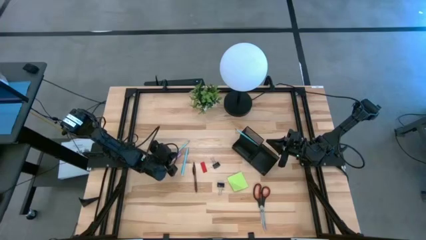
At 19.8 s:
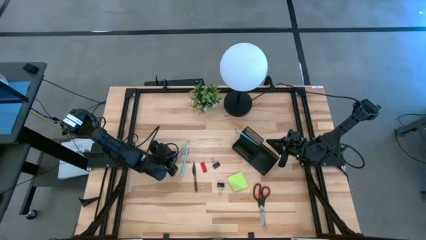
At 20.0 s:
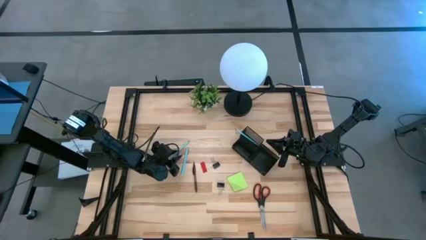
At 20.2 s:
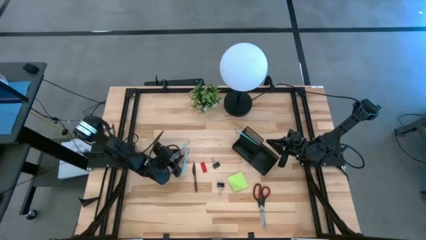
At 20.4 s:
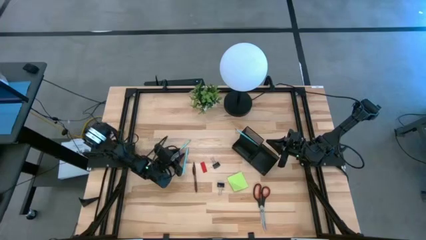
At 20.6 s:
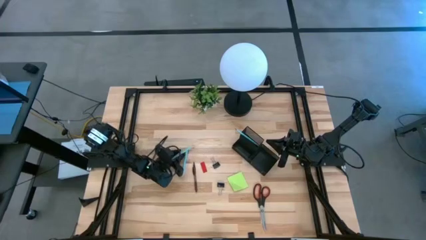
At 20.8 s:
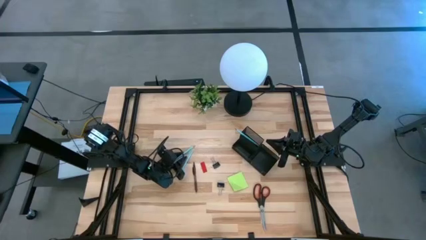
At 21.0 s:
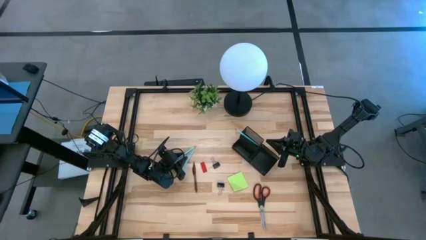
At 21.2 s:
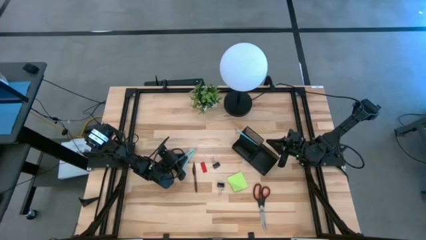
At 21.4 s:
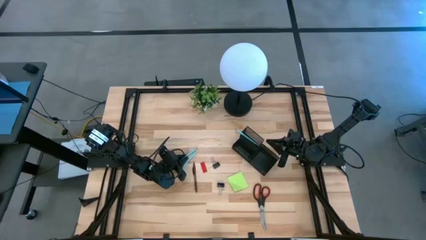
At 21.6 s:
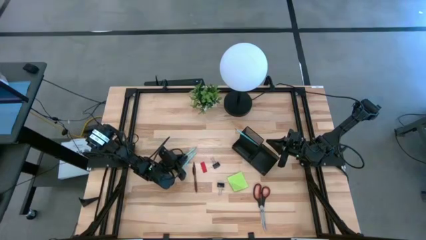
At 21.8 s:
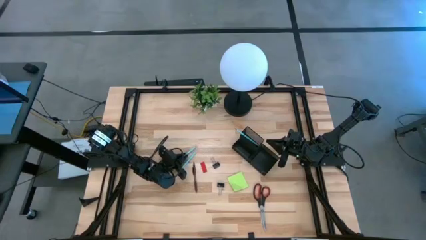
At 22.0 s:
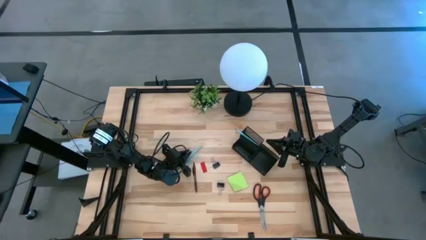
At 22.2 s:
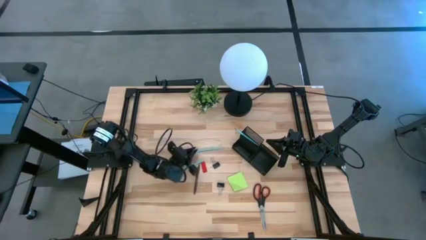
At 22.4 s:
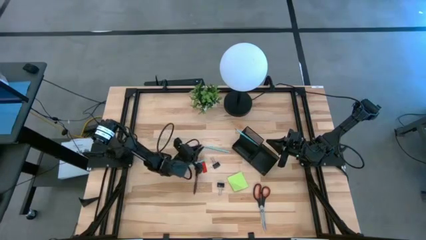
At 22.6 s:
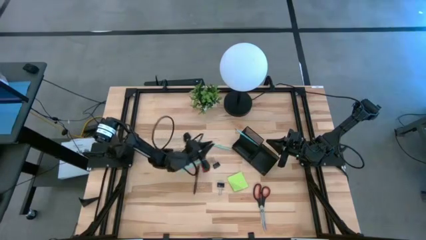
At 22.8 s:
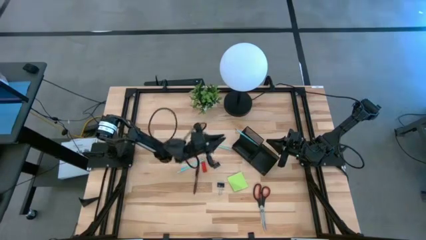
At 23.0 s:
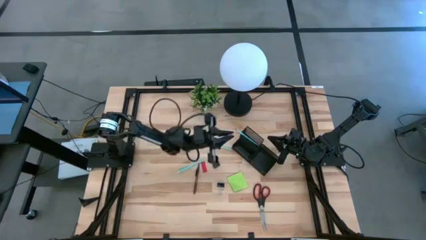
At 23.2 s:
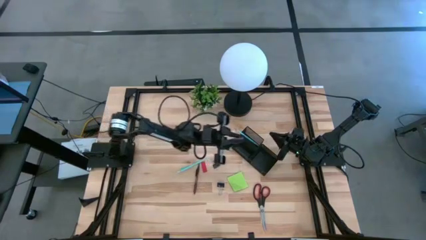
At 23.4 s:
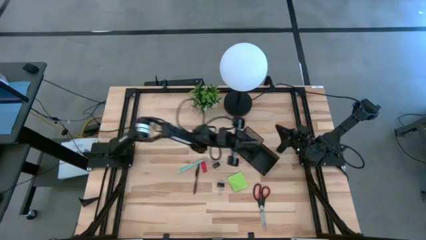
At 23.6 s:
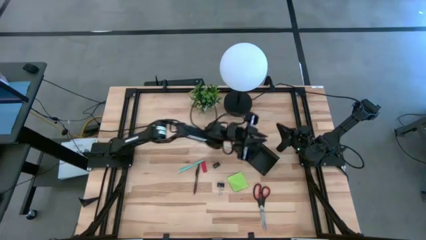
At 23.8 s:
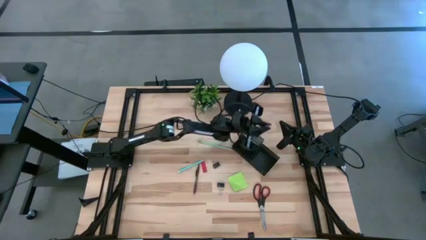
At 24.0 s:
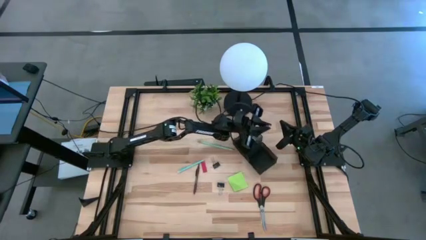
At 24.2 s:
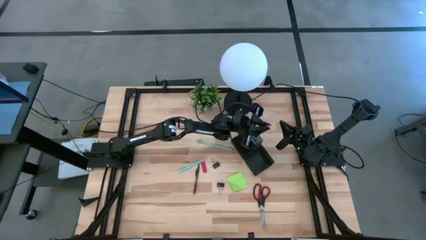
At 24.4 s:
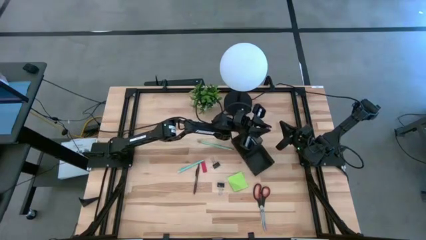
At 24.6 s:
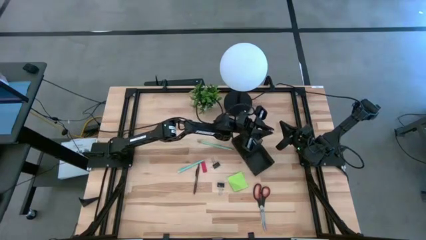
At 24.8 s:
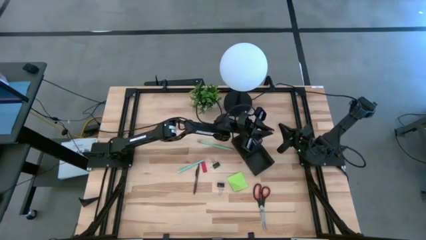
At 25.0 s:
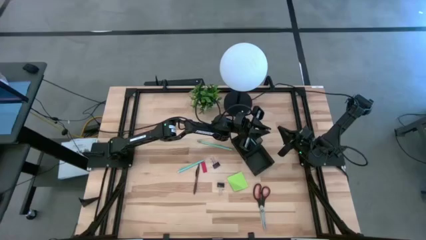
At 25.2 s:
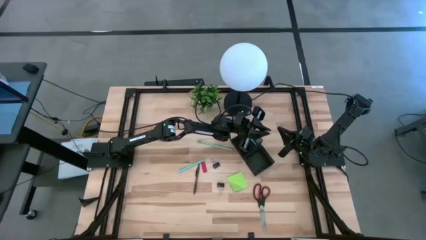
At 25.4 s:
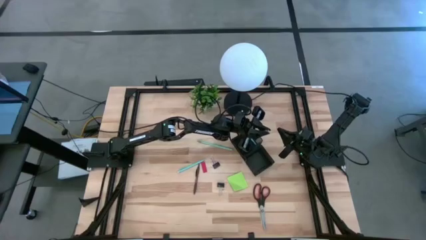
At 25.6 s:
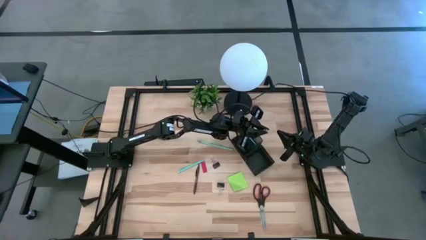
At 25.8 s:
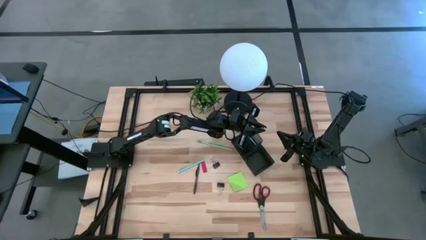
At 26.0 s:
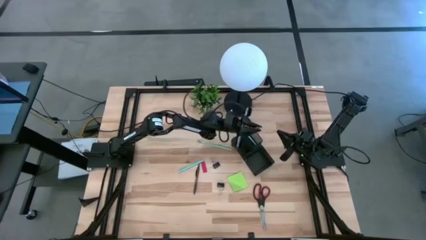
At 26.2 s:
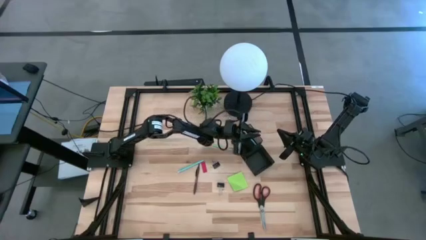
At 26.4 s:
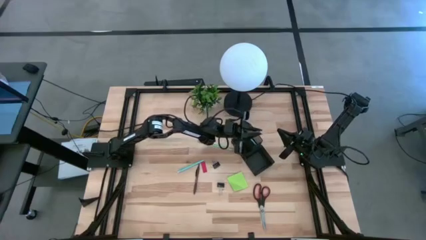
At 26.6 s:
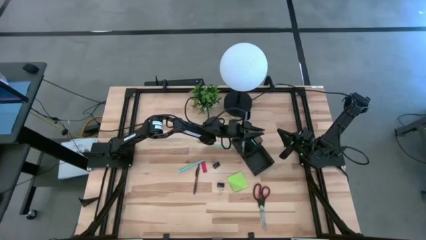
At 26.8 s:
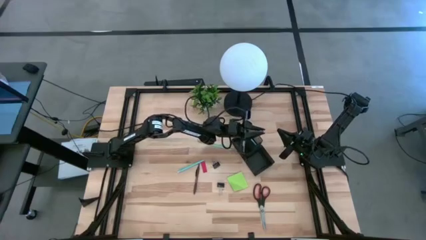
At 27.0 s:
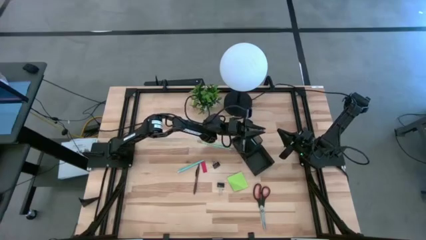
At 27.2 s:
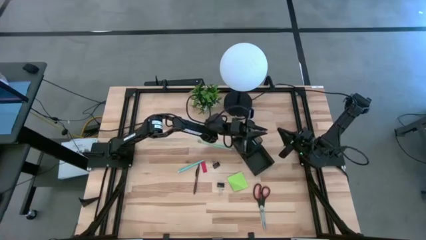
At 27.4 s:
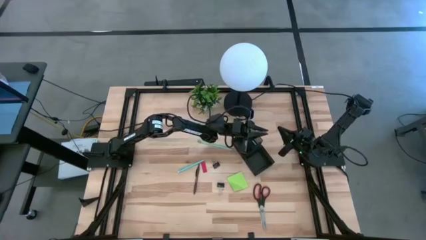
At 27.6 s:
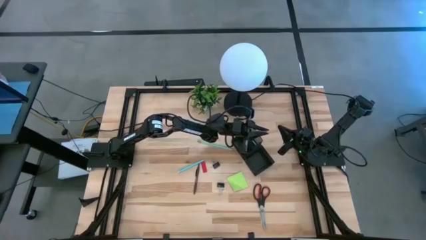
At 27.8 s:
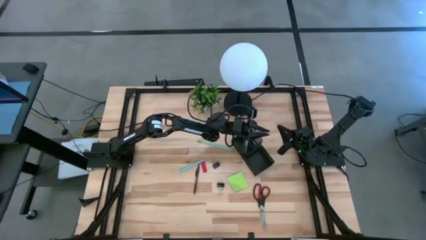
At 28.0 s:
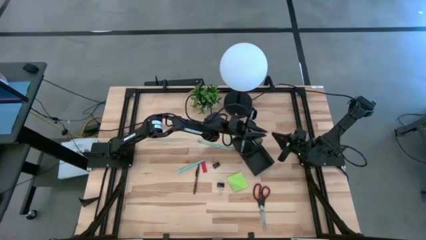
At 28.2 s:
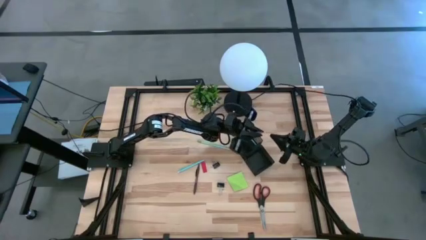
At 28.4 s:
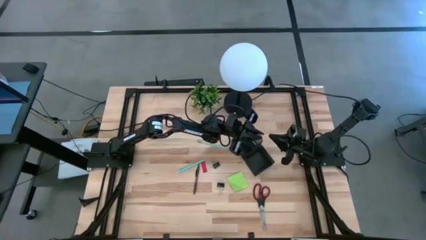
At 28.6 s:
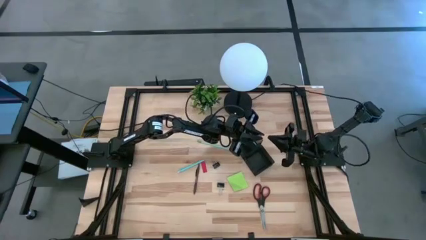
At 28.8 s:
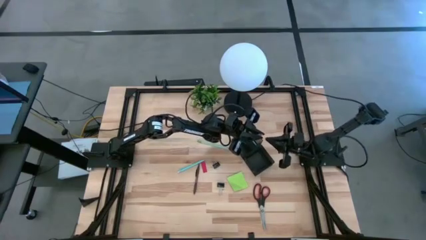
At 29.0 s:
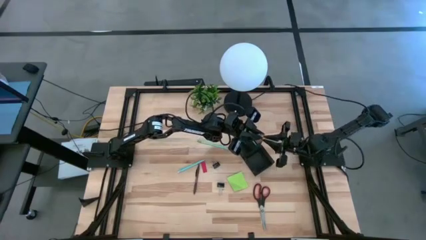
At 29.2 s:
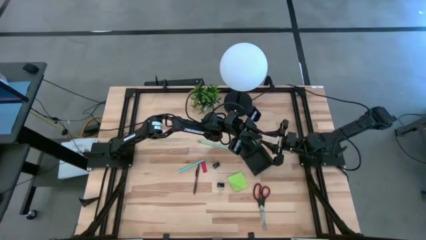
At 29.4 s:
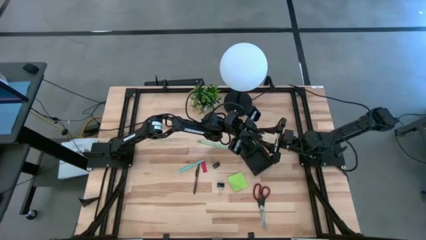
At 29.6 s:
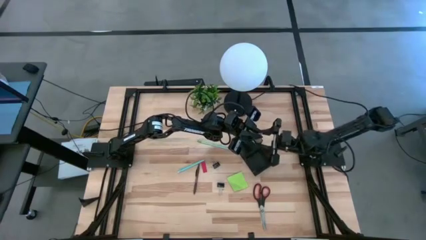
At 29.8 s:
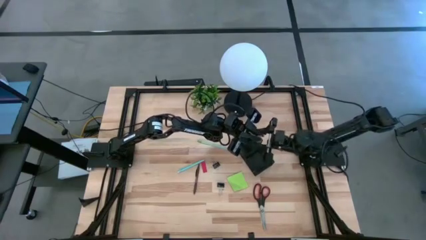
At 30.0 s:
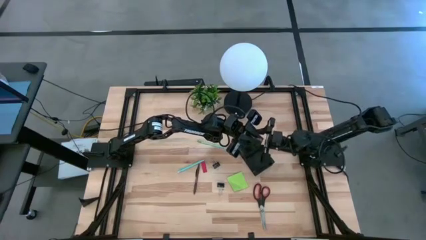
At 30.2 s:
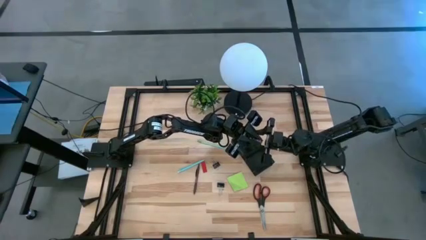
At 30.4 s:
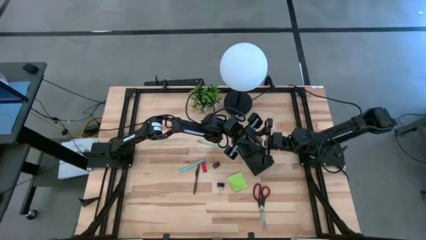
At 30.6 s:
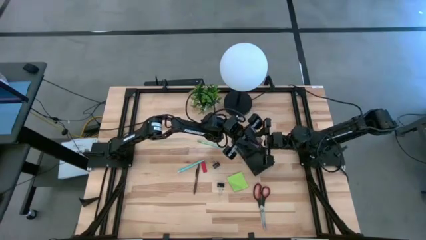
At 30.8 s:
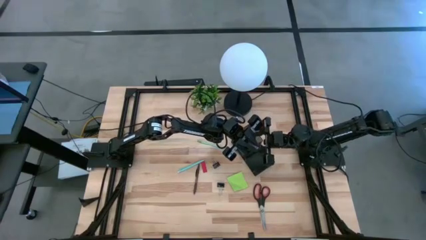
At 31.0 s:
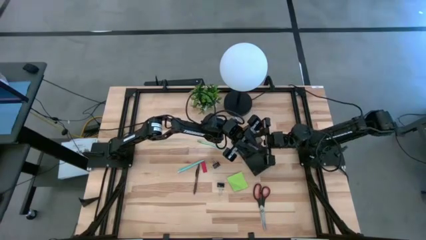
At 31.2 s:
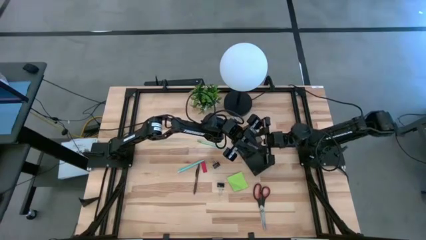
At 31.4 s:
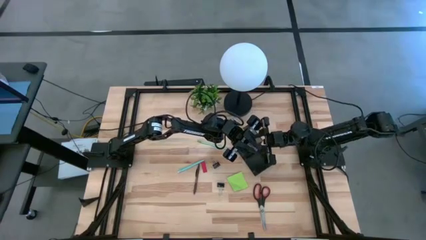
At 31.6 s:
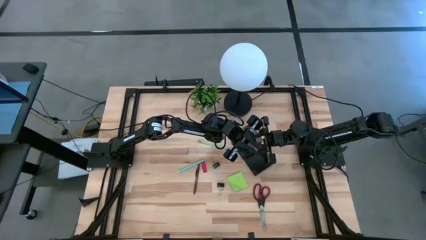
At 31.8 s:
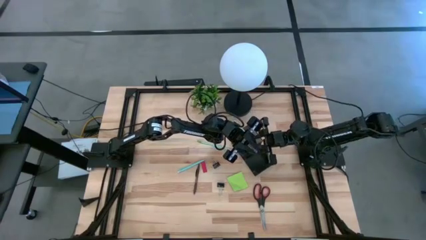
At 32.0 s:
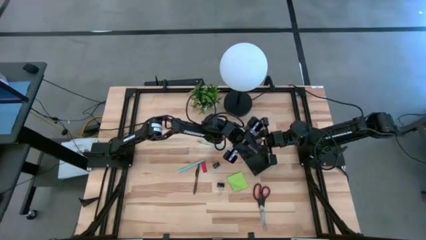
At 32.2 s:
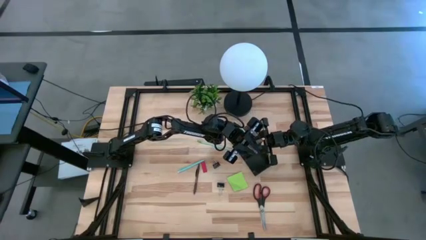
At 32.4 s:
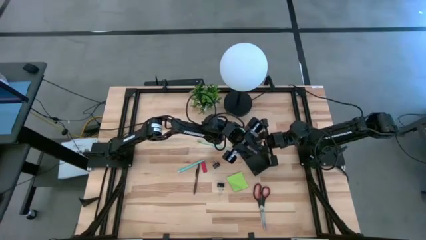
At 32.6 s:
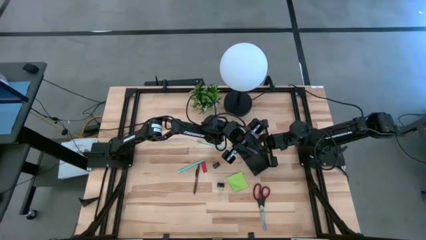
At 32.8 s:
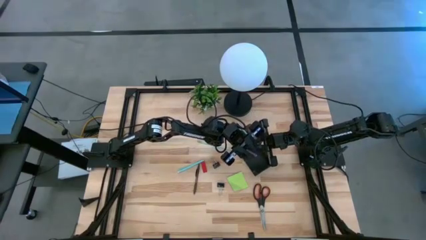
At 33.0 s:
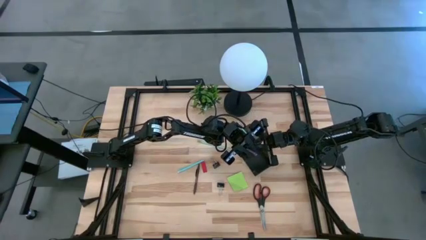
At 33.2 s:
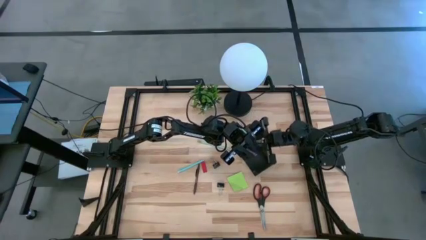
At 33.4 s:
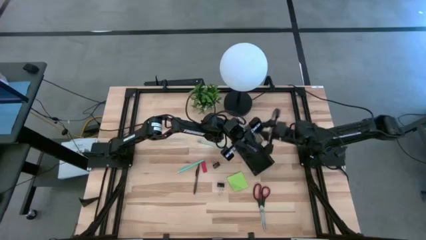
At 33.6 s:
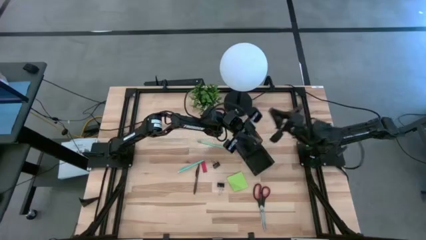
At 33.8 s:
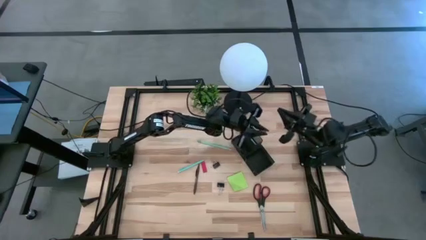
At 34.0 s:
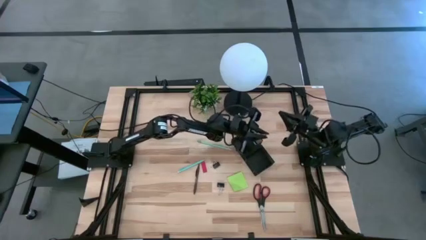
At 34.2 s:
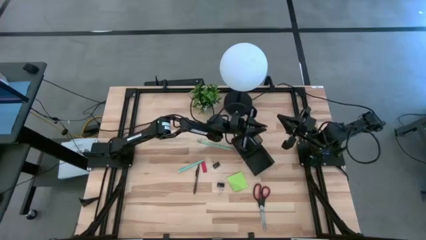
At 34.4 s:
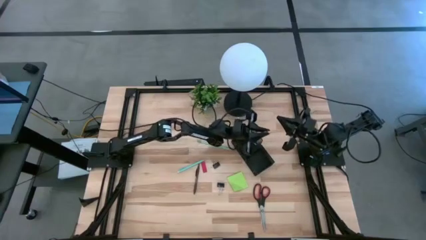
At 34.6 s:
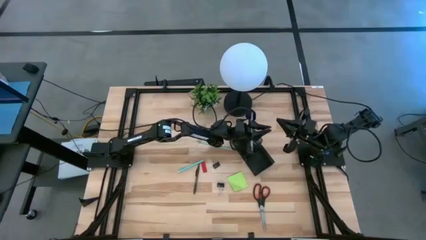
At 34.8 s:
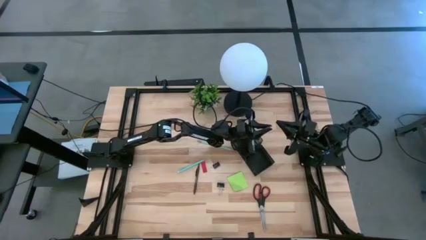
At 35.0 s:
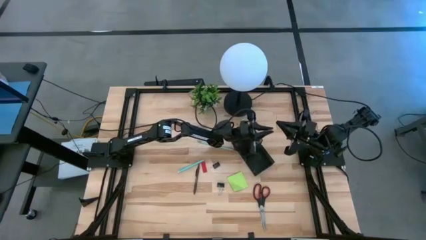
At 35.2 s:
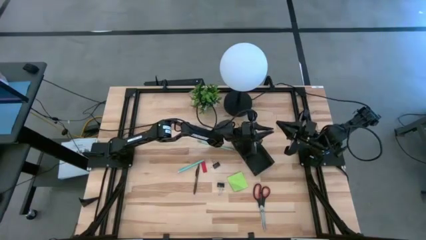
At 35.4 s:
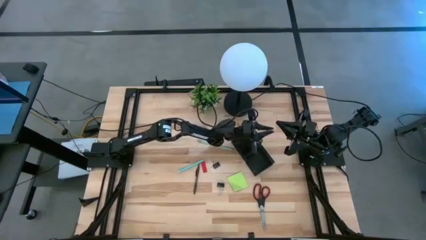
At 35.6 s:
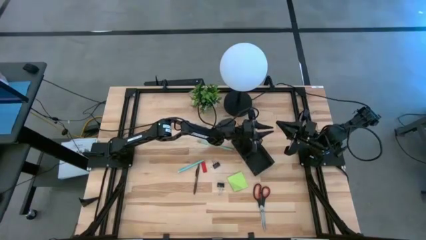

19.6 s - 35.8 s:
Task: Pick and place office supplies into organizer
Put the violet pen into the desk organizer
